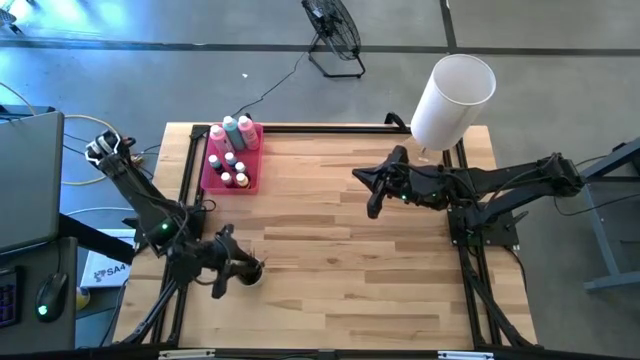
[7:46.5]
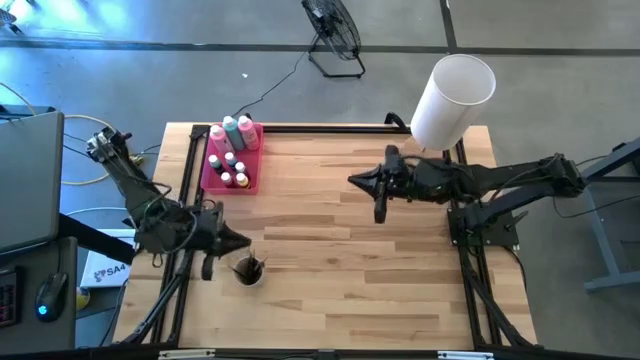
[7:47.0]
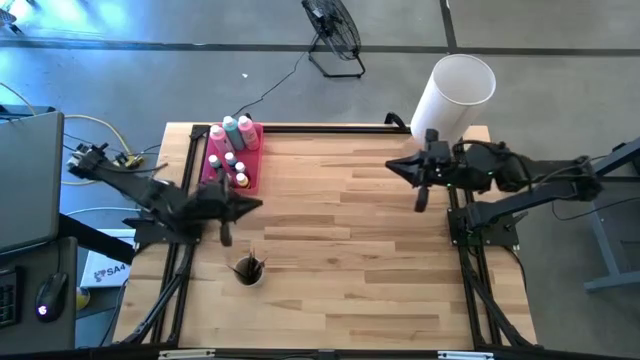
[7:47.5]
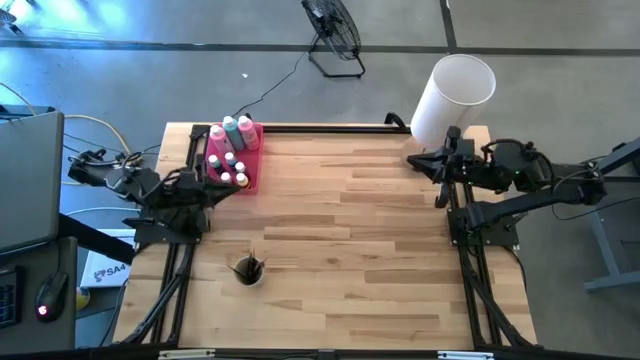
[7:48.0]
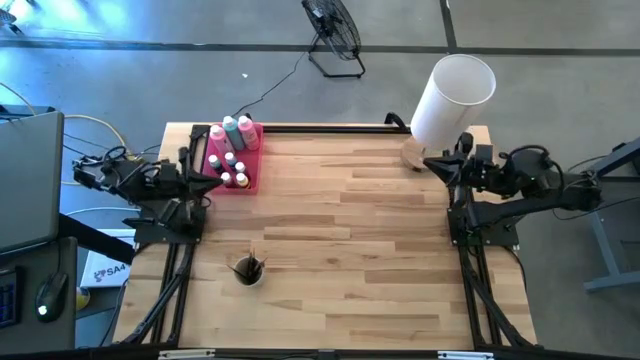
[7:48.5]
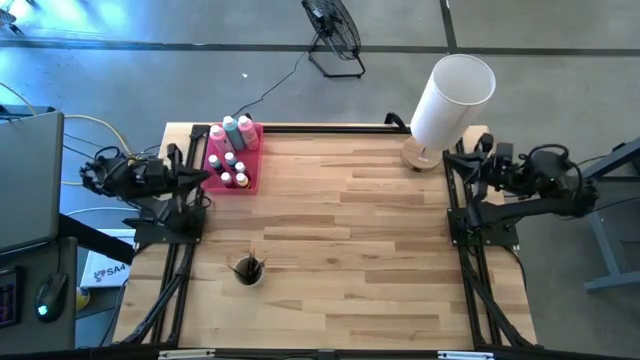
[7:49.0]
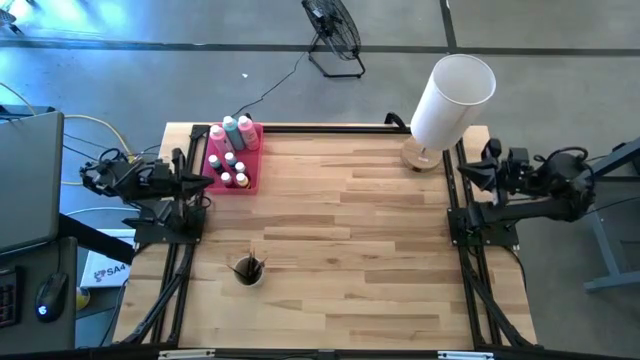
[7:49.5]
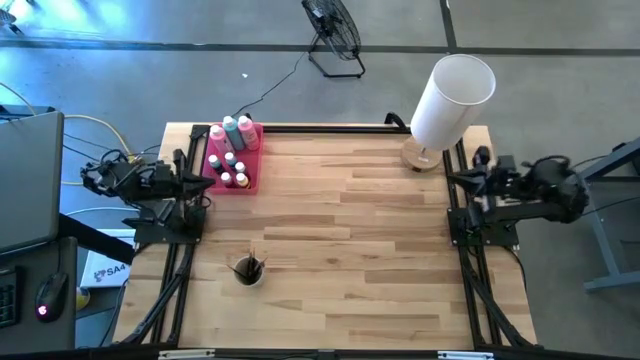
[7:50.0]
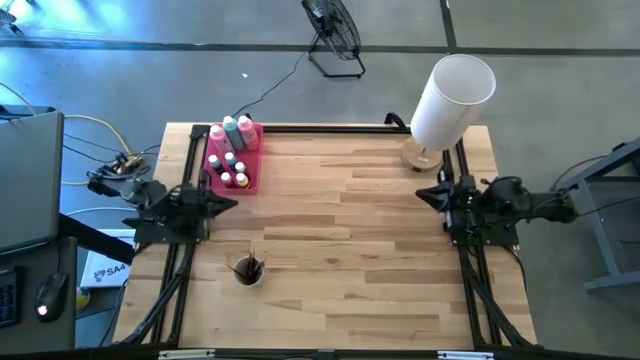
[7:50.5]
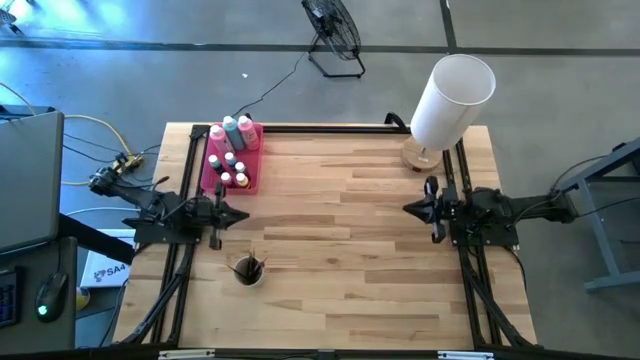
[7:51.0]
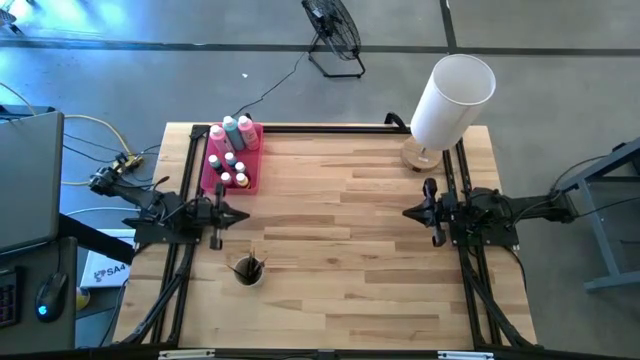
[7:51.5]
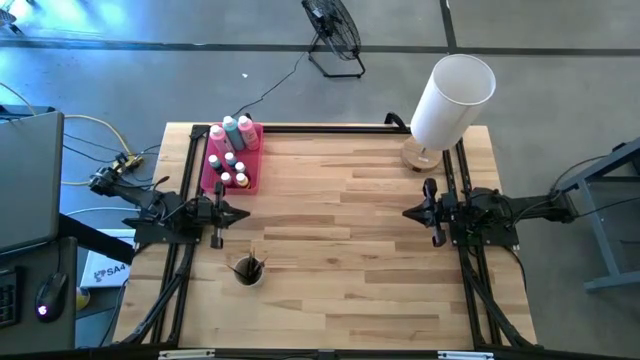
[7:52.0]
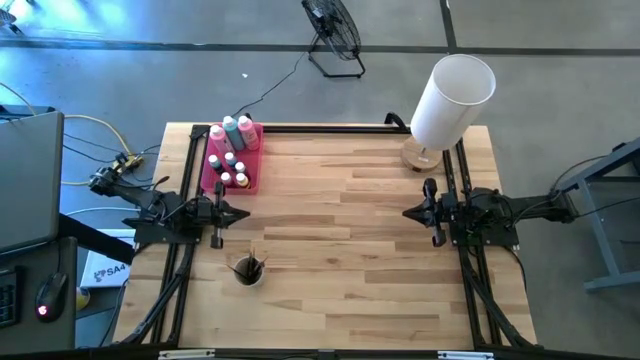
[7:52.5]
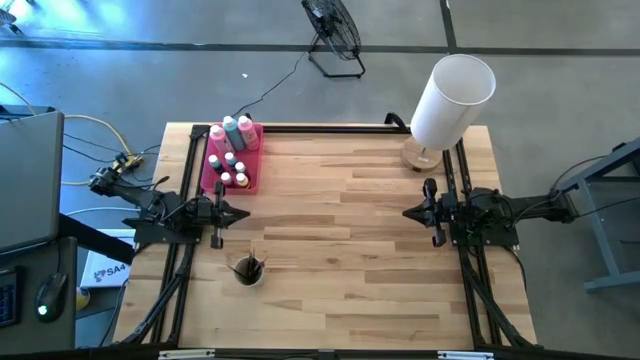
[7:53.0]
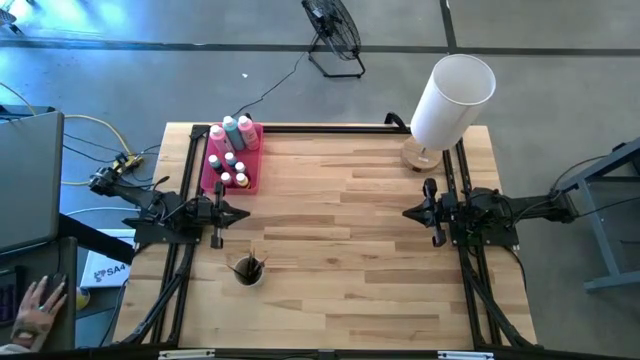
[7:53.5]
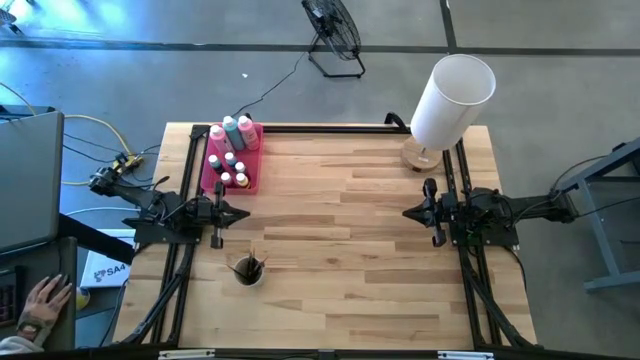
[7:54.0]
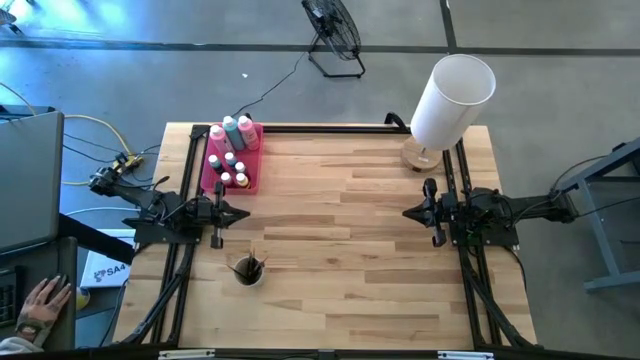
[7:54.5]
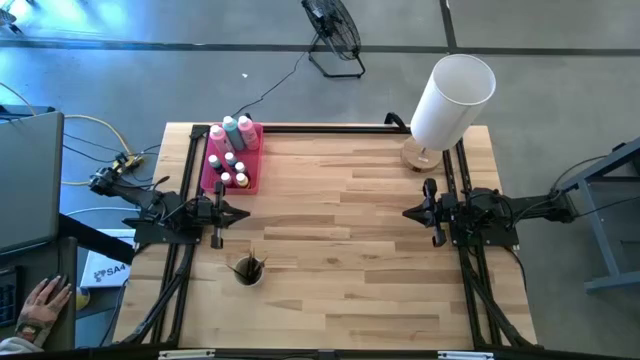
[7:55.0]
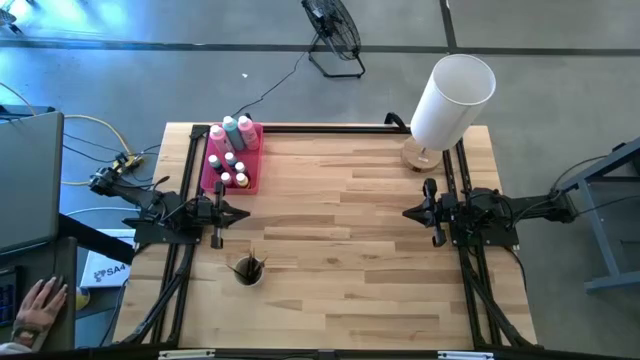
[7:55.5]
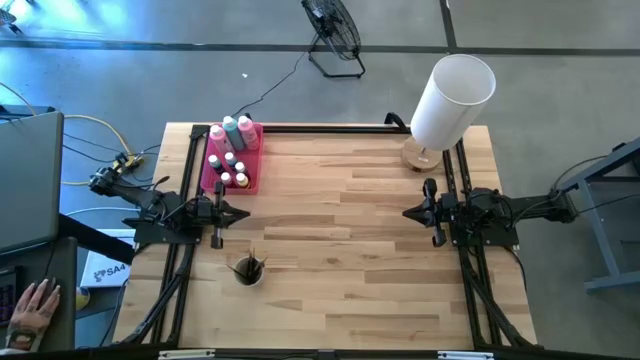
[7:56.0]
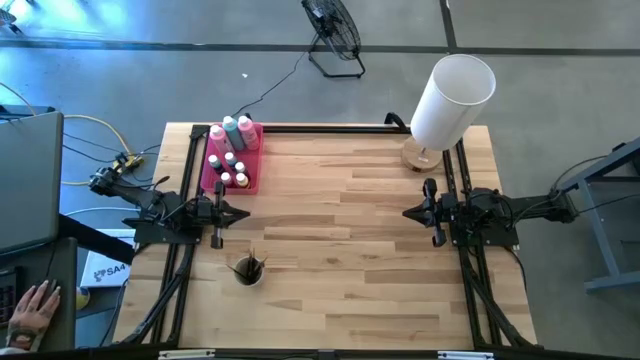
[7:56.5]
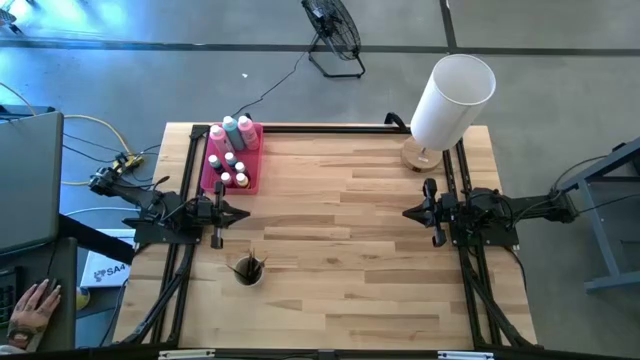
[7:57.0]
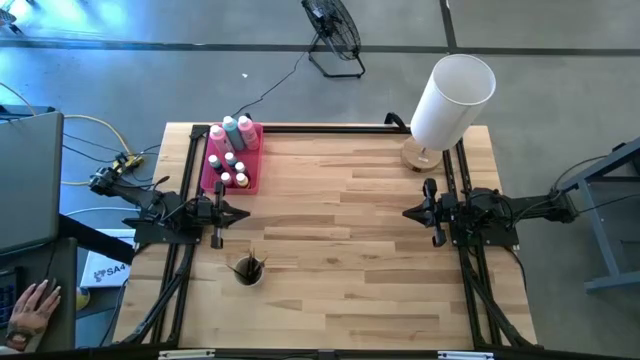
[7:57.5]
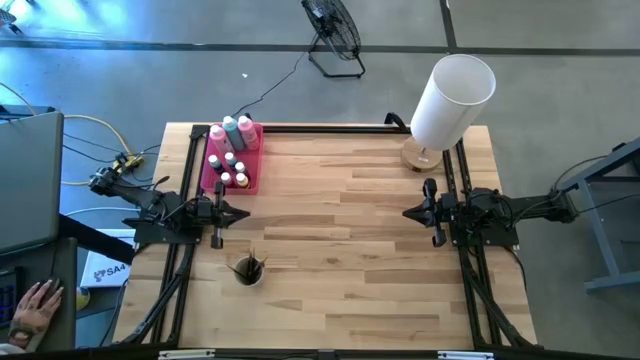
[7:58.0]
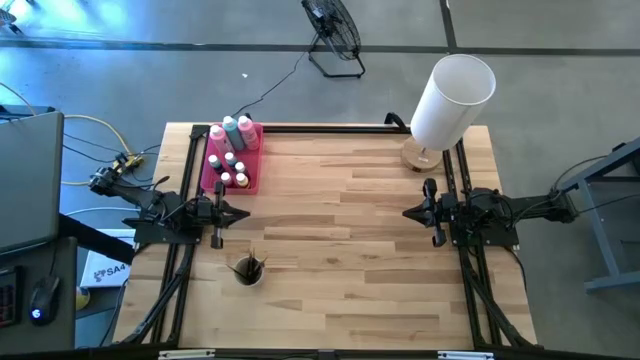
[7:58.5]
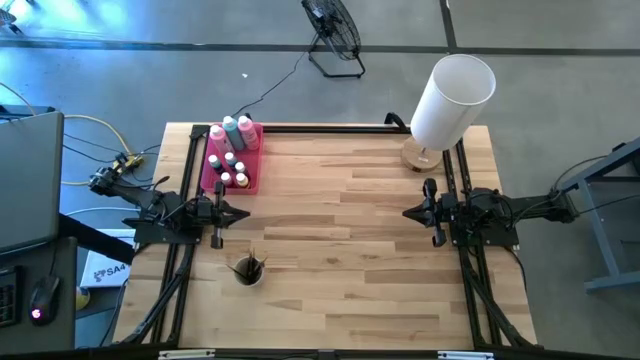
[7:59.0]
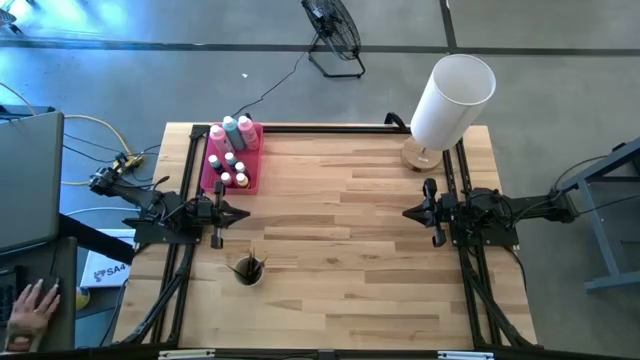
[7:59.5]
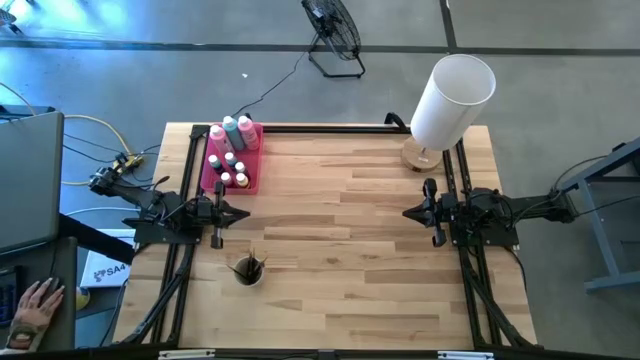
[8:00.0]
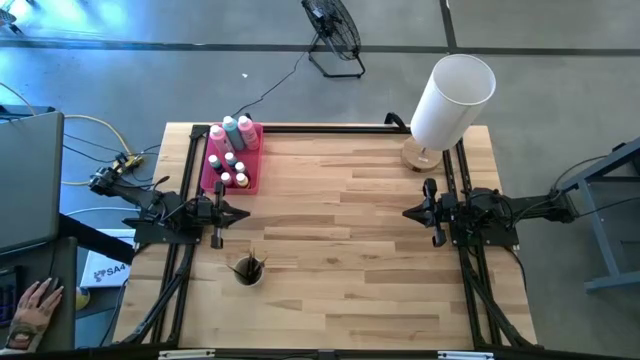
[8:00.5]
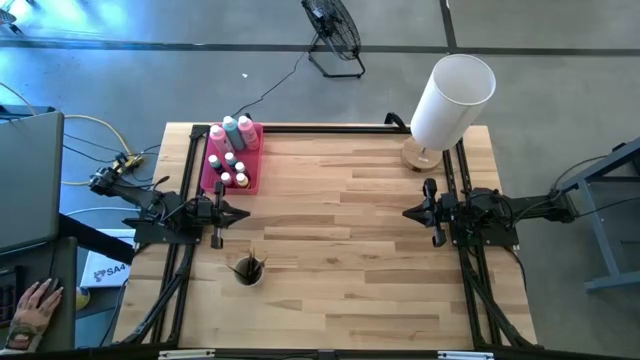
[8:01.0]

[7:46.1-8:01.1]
Task: Pick & Place Paint Supplies
Return to Home Position
